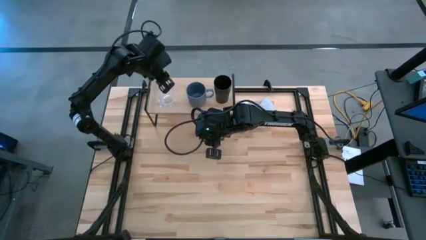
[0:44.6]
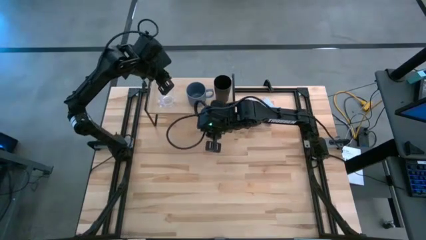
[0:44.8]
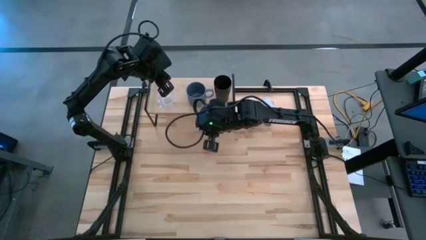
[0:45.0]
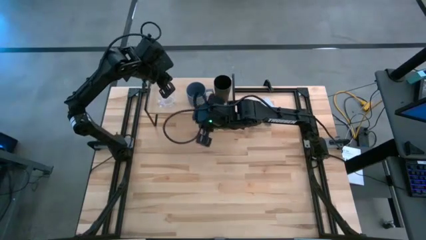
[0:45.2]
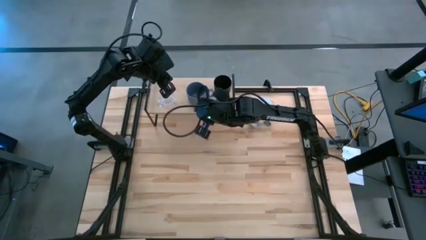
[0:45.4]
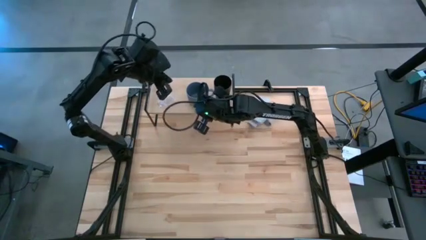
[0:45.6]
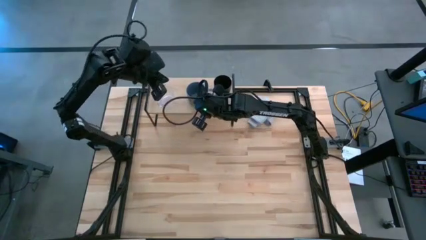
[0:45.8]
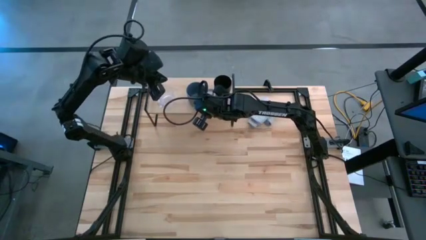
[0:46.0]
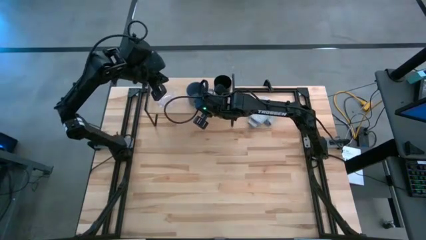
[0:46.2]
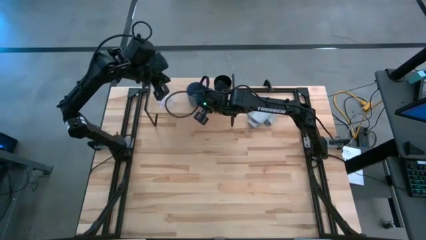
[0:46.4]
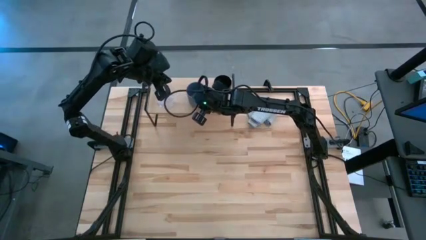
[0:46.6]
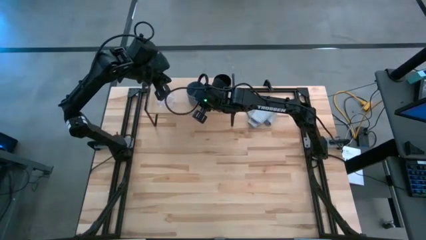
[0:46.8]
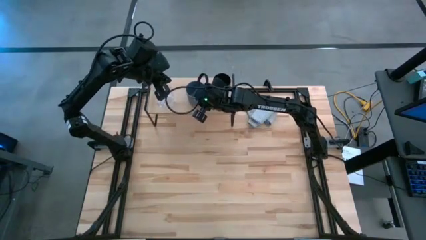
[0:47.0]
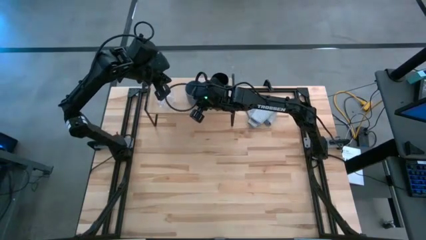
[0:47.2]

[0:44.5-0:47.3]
Task: Stack small to large cups/mugs on shelf
Adjust the blue mug on the shelf

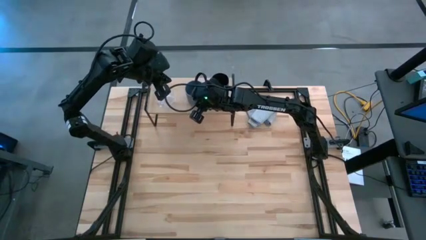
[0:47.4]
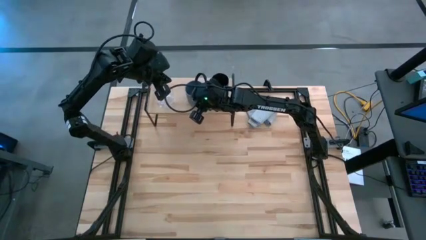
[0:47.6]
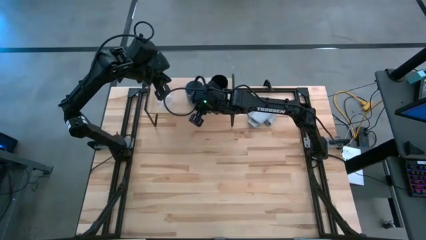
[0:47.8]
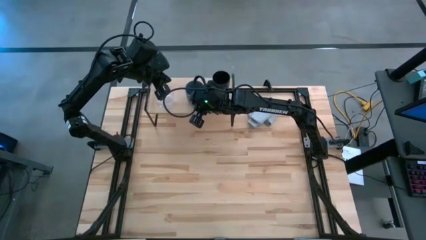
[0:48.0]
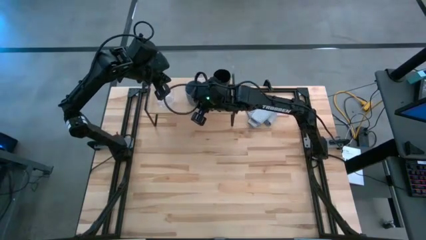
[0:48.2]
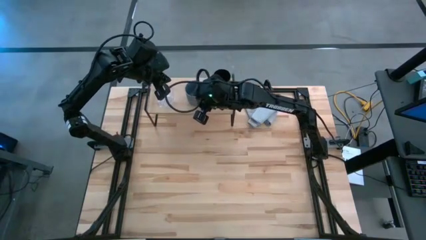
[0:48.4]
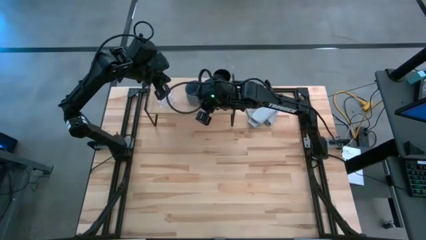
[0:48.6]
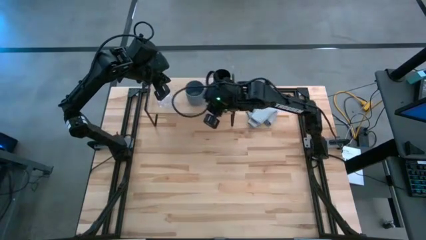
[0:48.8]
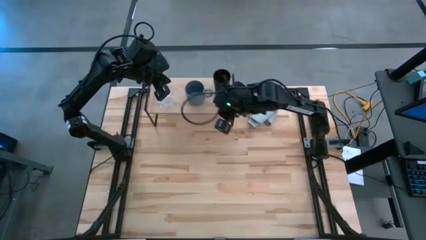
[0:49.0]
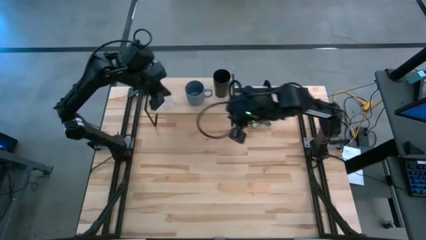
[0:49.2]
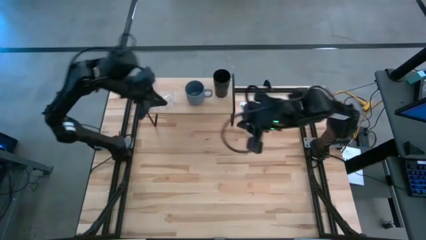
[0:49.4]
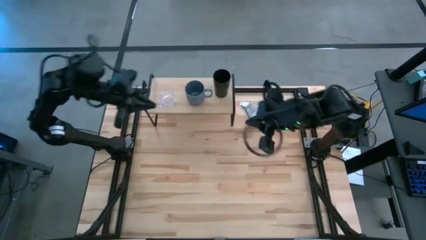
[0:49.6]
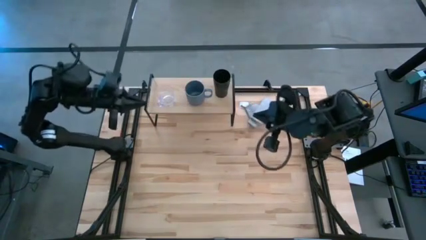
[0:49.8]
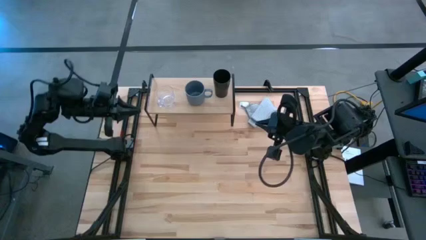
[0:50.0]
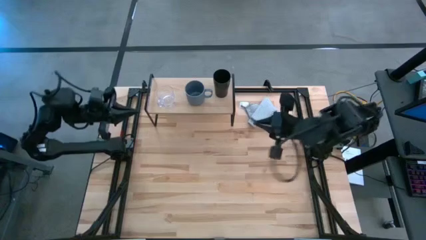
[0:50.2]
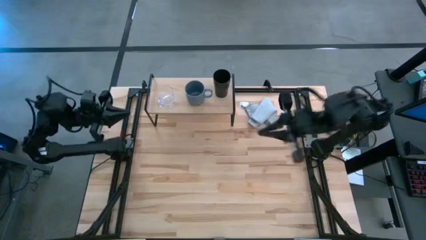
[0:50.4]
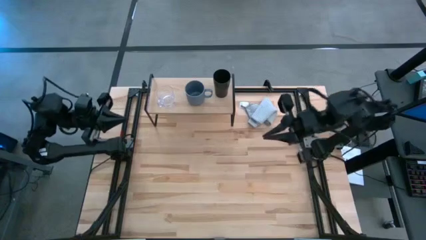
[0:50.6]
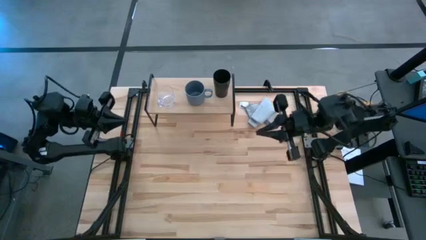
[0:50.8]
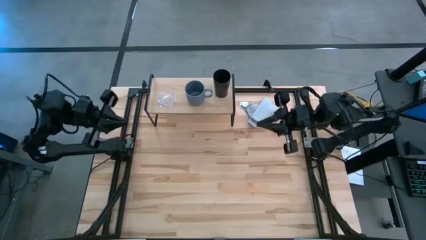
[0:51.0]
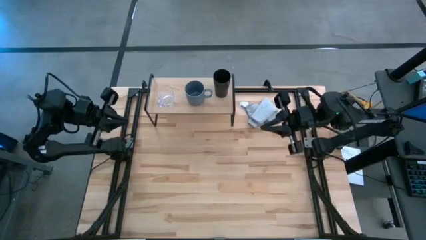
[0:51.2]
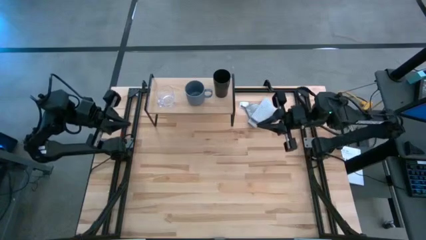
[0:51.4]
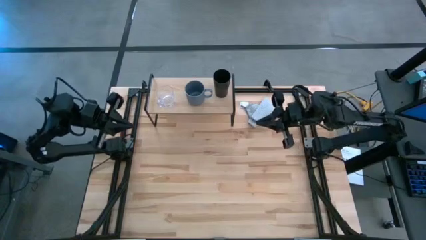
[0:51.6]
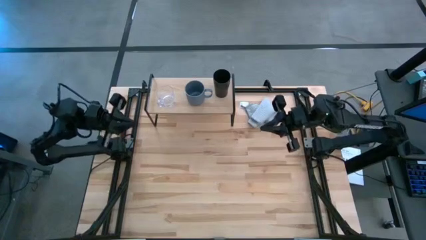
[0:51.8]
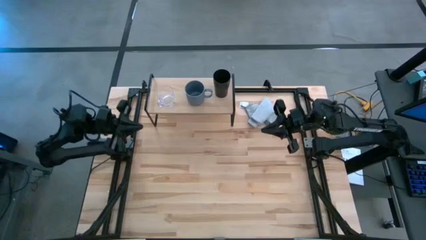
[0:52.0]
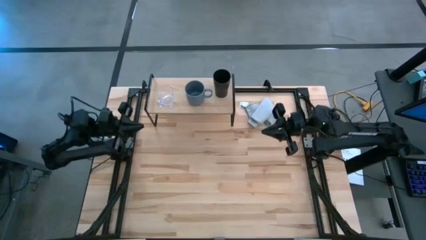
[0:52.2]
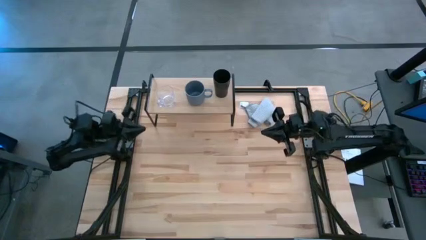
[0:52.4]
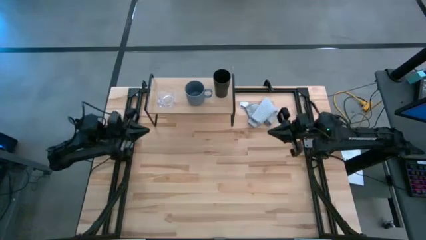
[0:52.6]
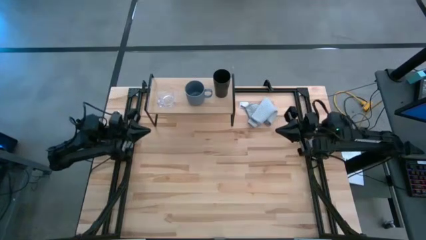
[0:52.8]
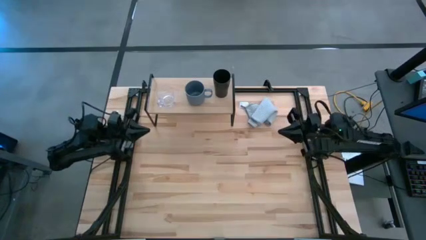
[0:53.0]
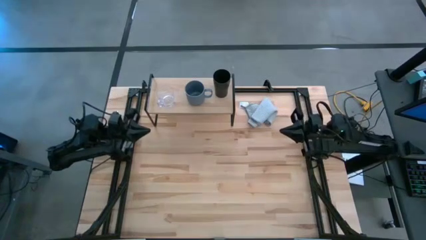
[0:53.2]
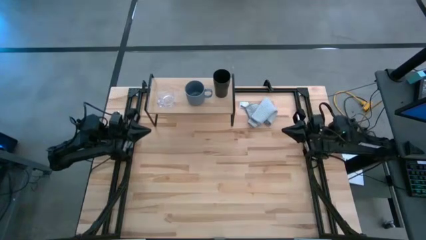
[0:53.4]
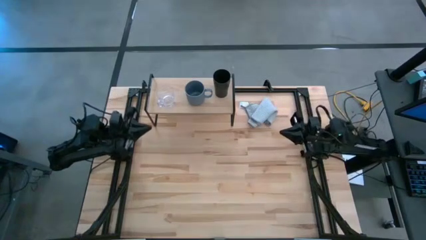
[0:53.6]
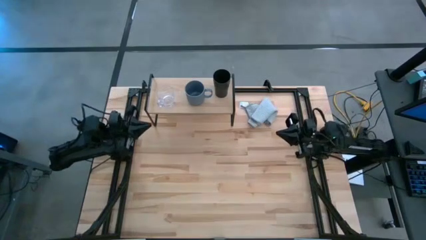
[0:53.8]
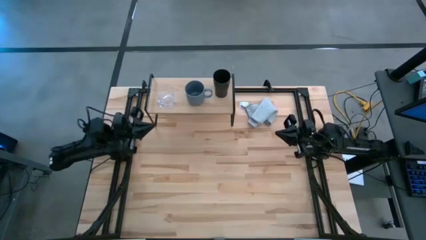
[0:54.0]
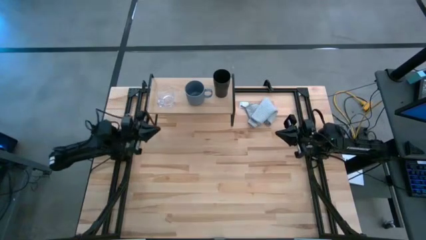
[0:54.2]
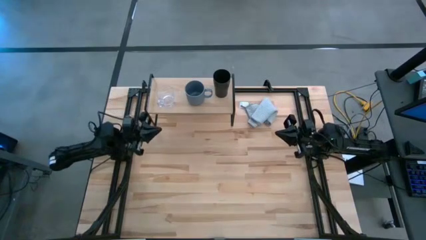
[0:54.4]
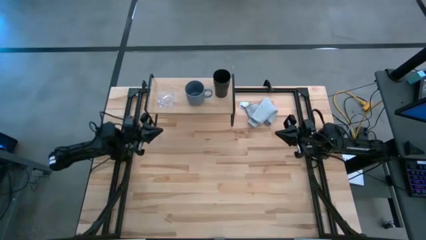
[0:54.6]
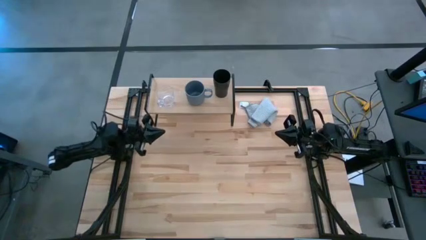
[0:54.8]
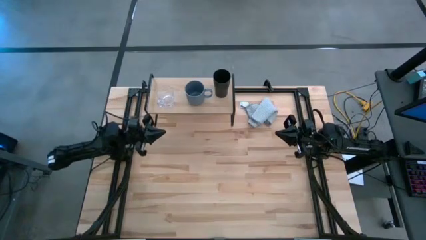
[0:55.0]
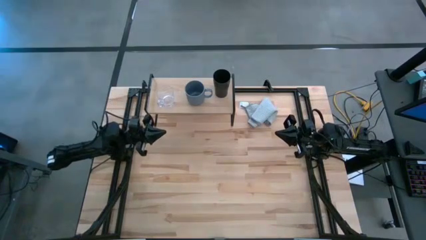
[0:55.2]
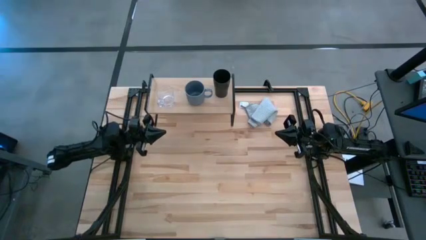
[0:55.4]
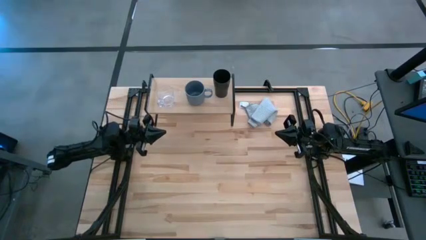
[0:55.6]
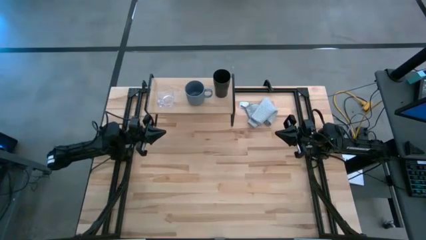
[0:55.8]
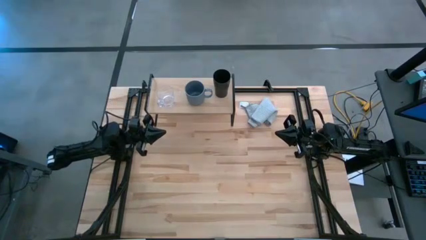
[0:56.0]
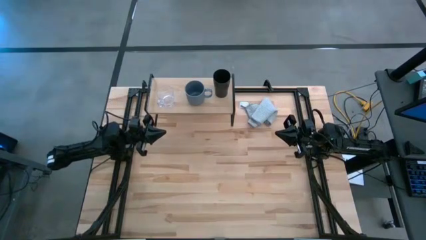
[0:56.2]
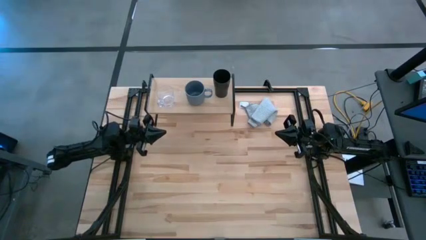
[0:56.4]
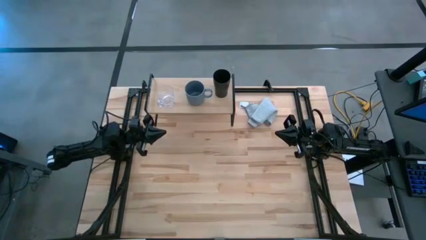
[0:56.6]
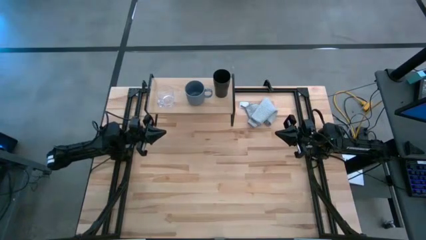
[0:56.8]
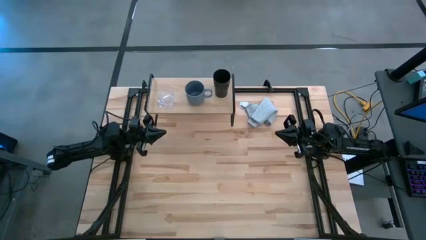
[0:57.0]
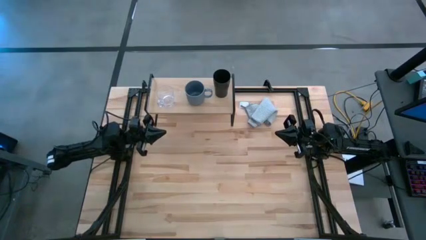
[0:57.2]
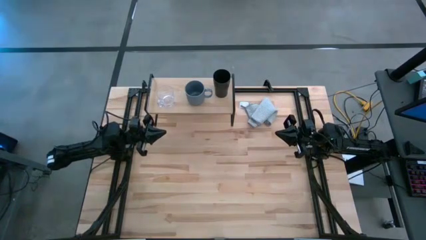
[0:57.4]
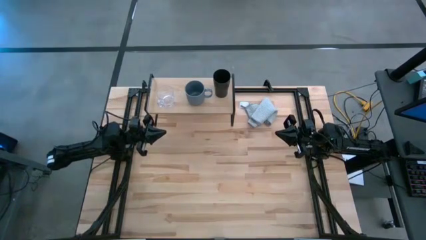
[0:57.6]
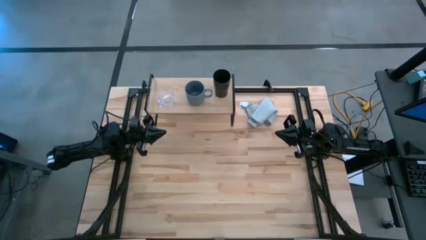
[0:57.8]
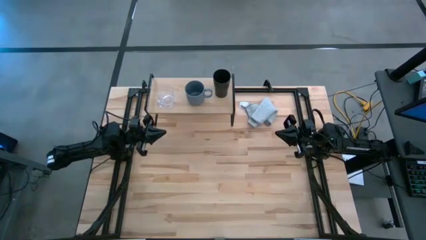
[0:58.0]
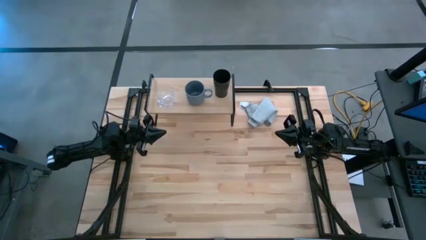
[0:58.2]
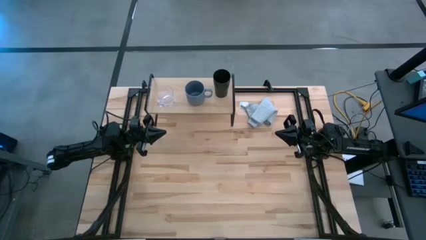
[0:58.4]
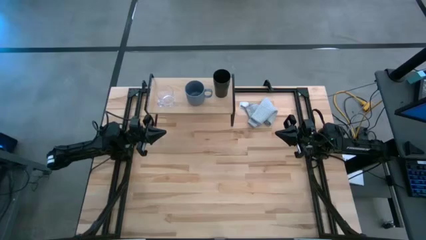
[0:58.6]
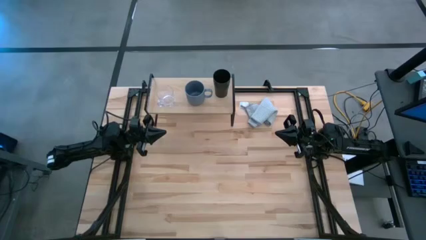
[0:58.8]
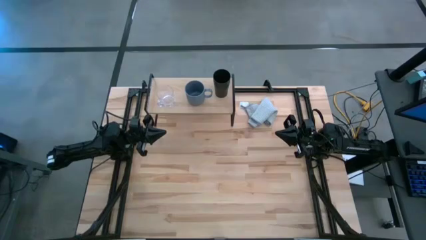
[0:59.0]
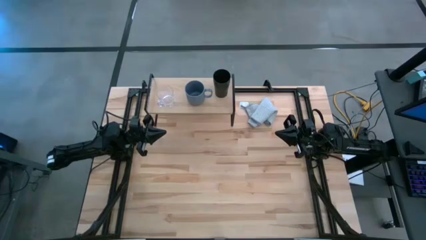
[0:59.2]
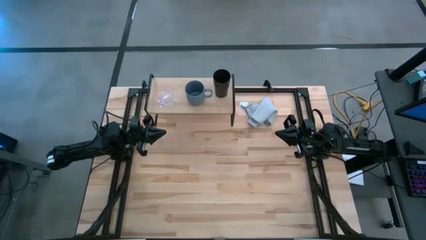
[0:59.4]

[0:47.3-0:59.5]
Return to Home Position

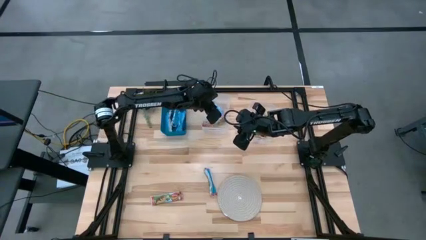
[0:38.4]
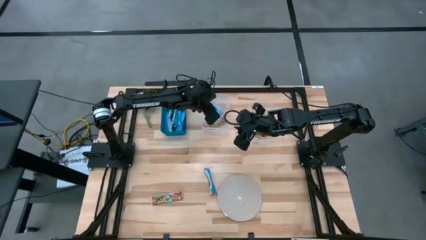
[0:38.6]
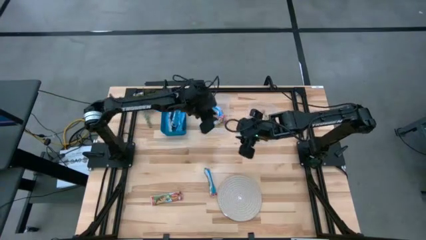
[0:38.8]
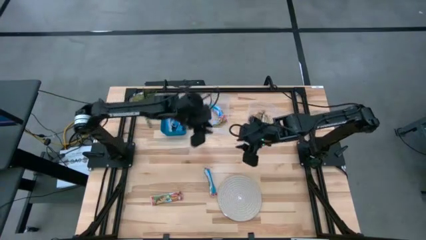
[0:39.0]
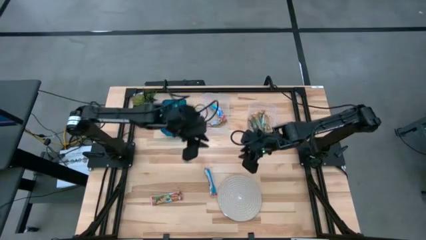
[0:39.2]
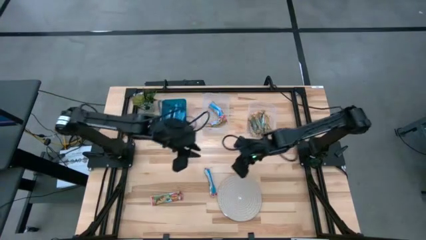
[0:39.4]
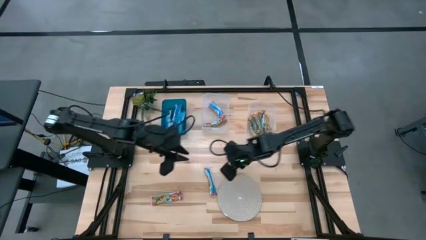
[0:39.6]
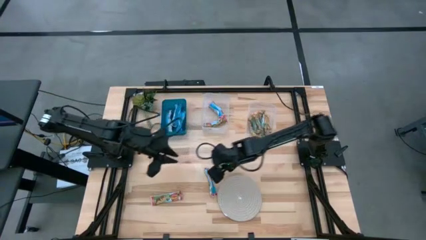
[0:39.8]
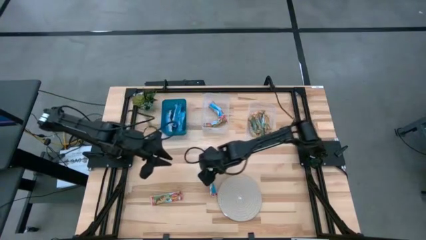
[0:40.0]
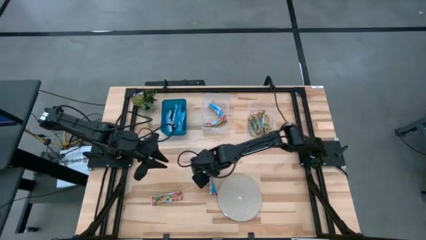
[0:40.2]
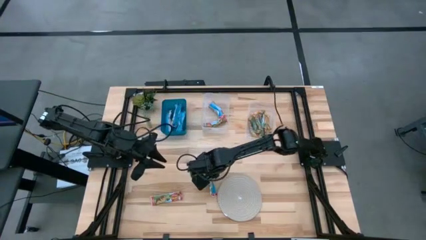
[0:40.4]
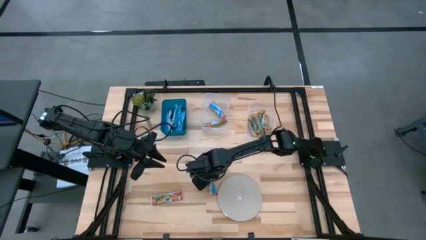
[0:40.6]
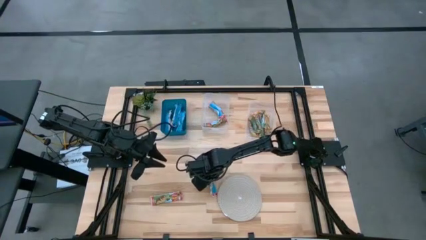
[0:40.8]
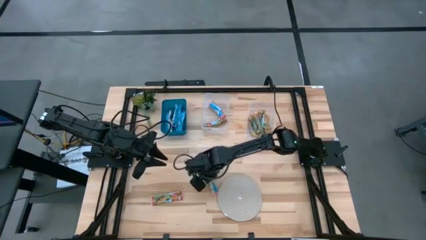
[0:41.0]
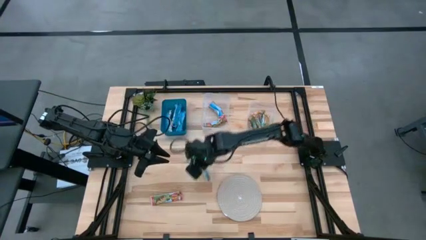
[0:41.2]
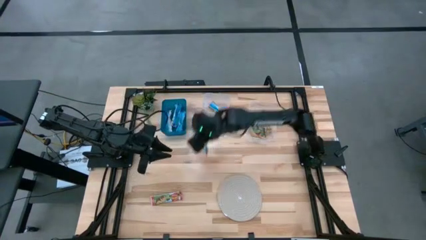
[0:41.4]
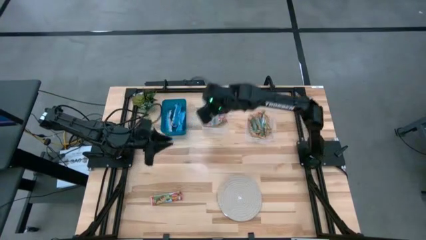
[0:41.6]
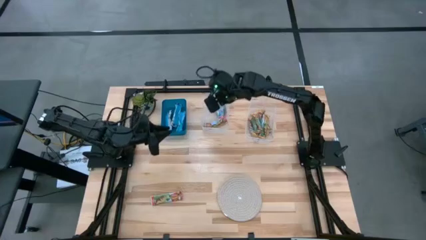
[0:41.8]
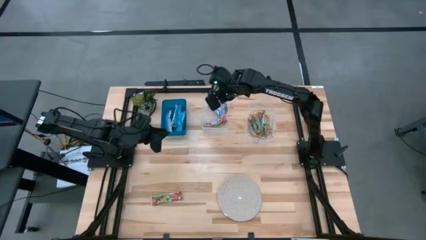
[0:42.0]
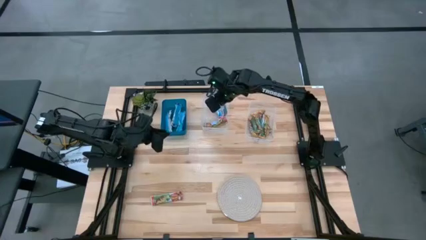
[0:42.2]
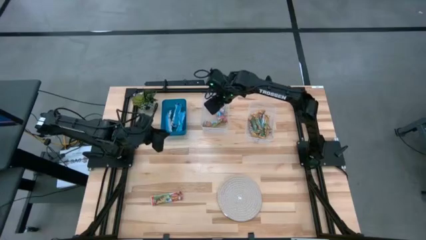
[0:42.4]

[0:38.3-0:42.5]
Task: Pick and place Granola Bars by type
Put the red granola bar into the left transparent bin
